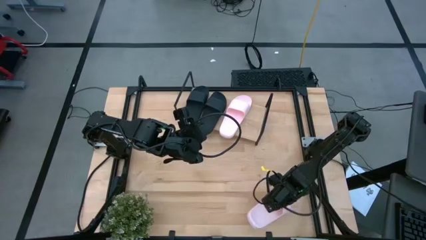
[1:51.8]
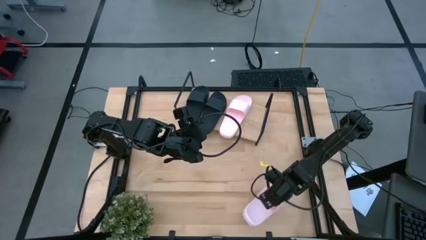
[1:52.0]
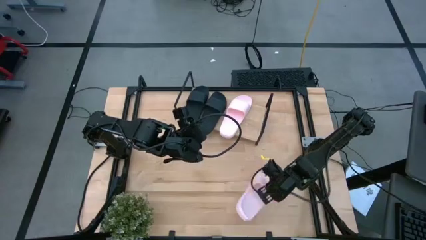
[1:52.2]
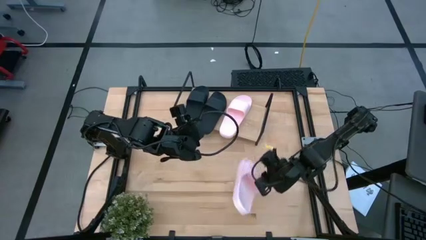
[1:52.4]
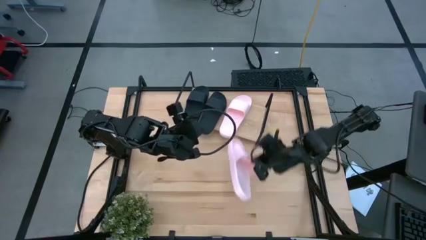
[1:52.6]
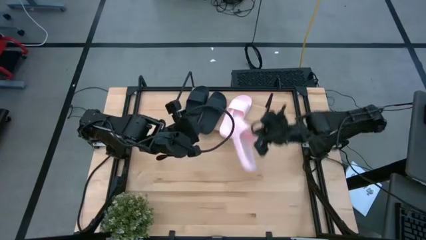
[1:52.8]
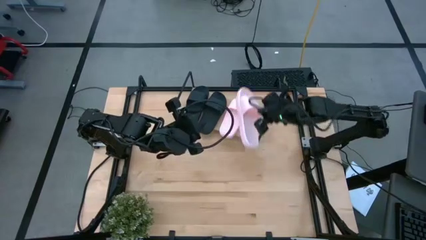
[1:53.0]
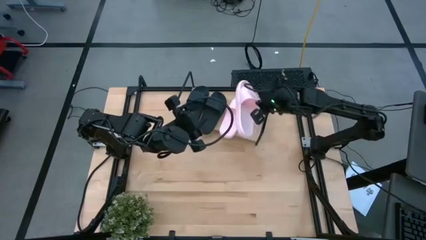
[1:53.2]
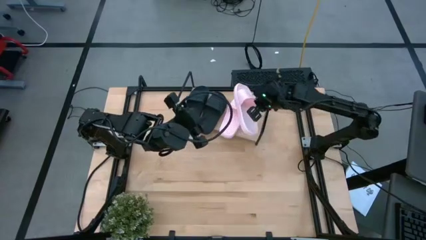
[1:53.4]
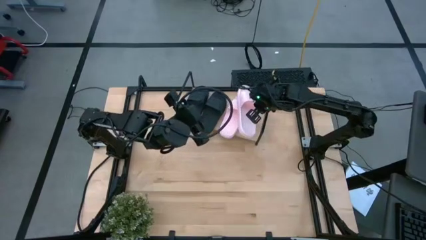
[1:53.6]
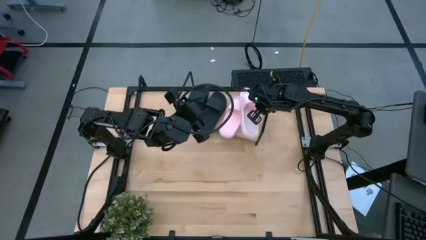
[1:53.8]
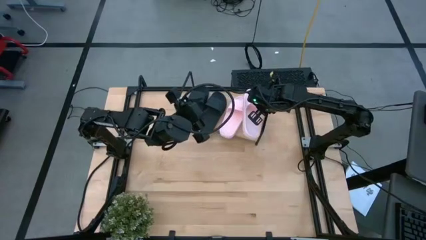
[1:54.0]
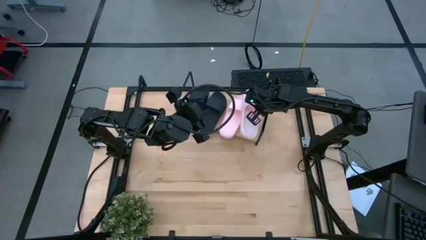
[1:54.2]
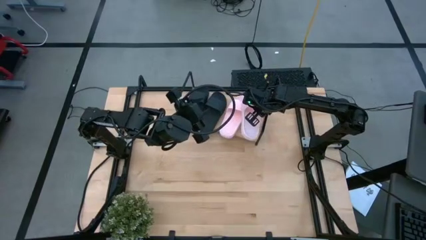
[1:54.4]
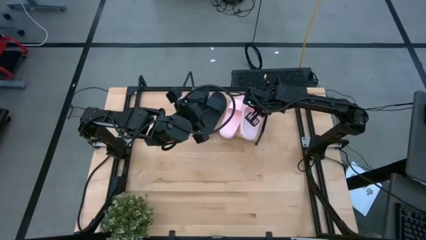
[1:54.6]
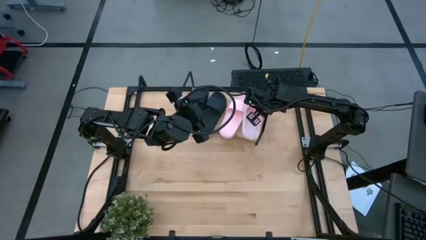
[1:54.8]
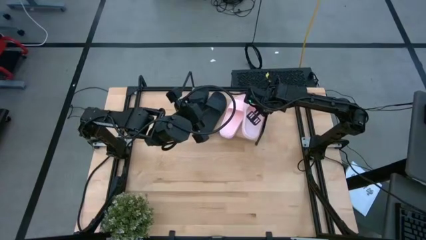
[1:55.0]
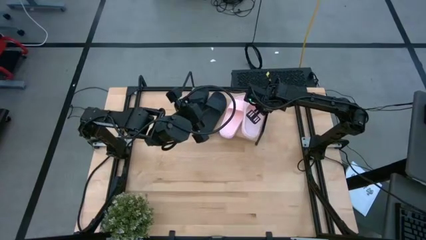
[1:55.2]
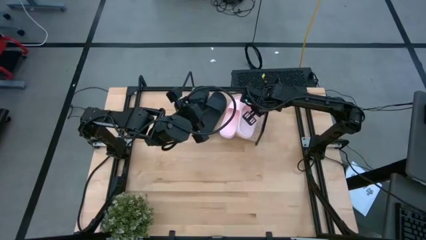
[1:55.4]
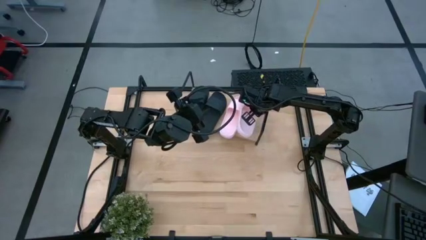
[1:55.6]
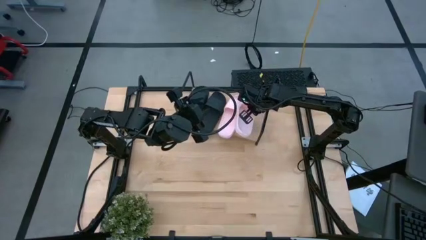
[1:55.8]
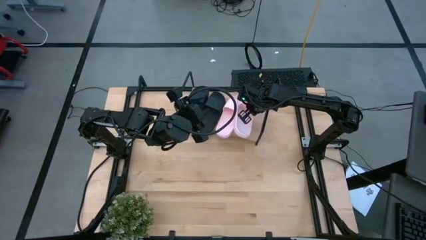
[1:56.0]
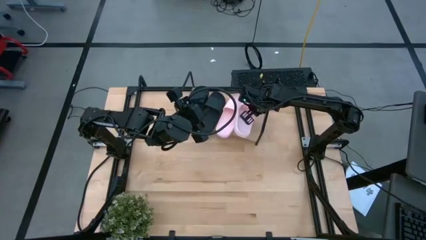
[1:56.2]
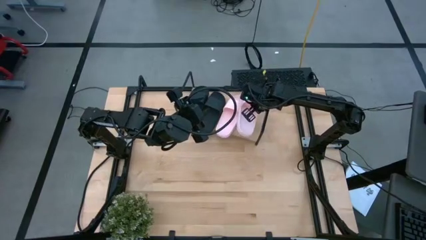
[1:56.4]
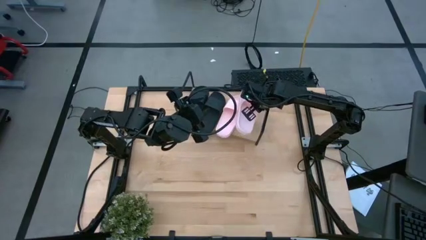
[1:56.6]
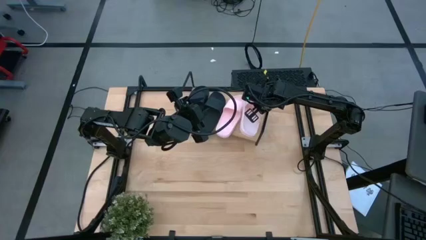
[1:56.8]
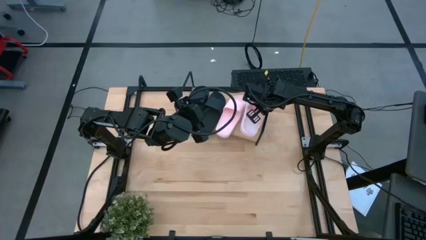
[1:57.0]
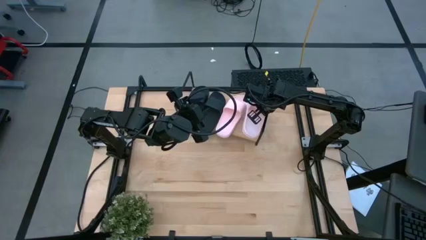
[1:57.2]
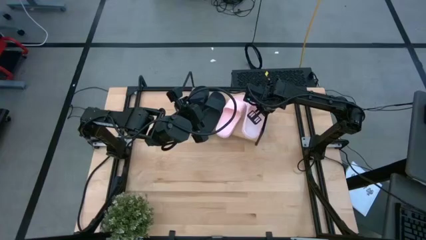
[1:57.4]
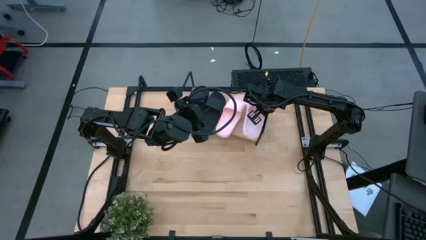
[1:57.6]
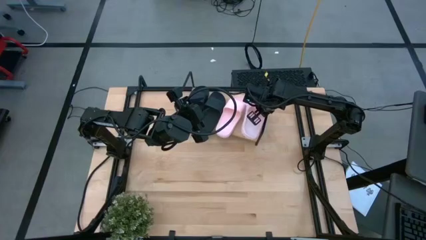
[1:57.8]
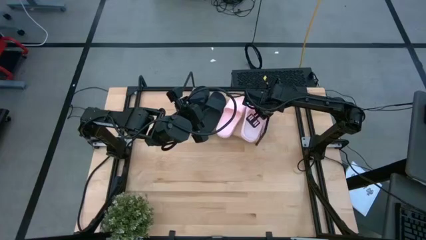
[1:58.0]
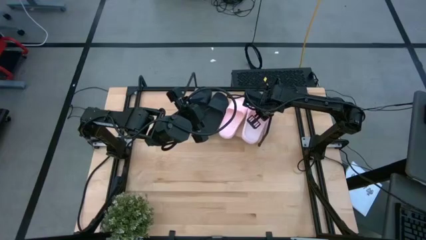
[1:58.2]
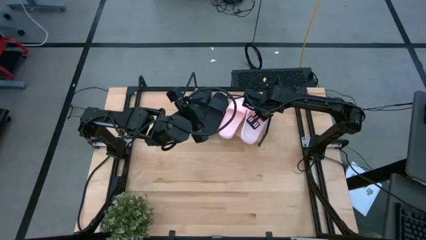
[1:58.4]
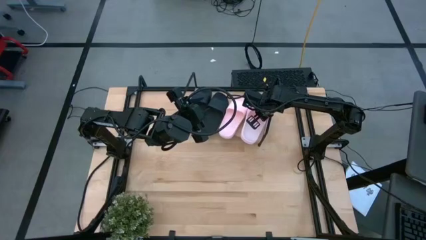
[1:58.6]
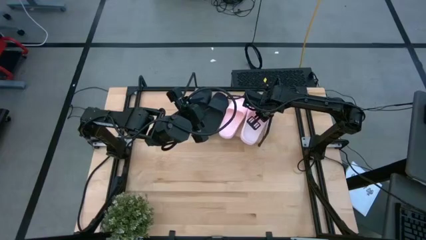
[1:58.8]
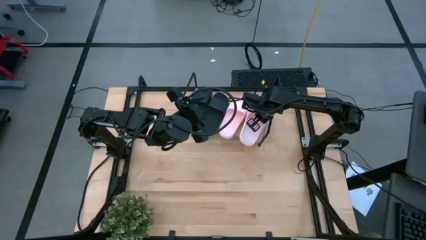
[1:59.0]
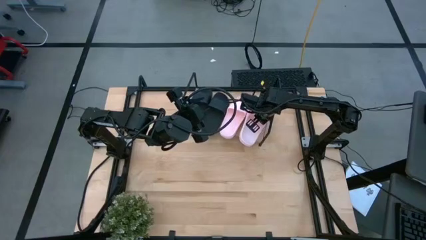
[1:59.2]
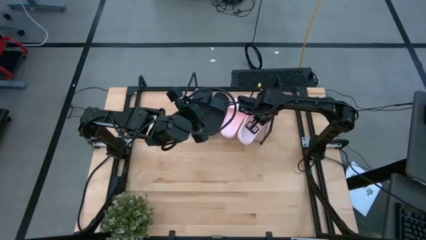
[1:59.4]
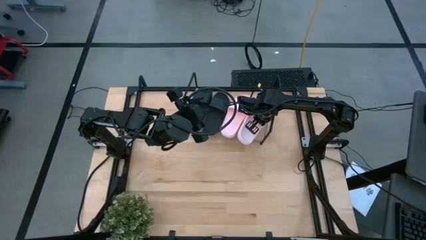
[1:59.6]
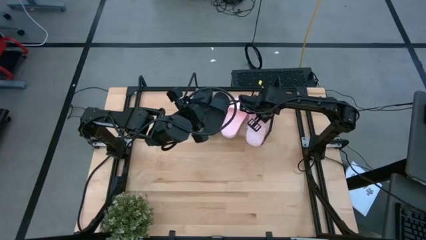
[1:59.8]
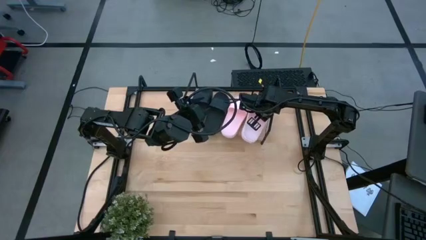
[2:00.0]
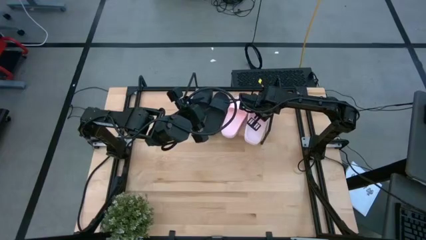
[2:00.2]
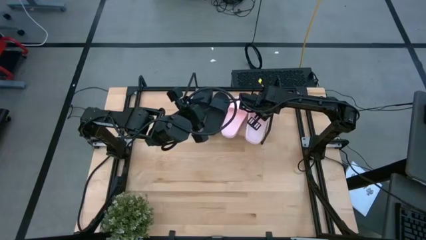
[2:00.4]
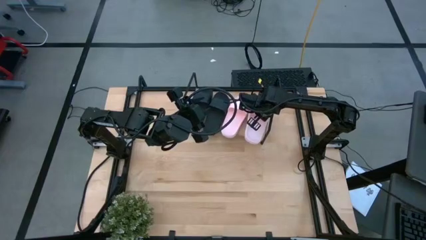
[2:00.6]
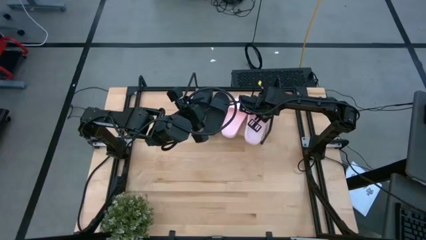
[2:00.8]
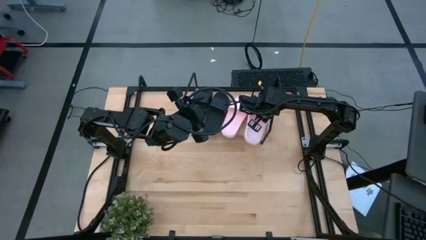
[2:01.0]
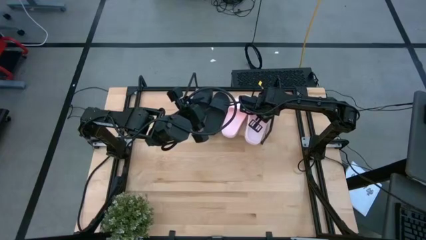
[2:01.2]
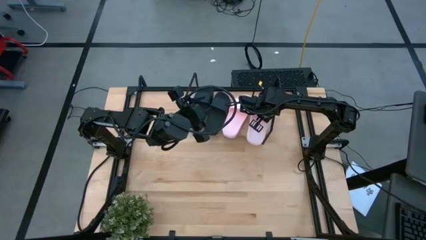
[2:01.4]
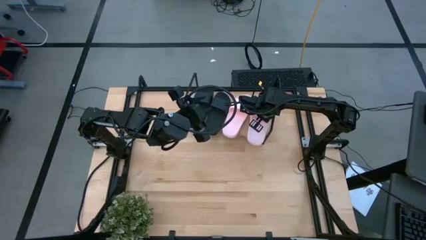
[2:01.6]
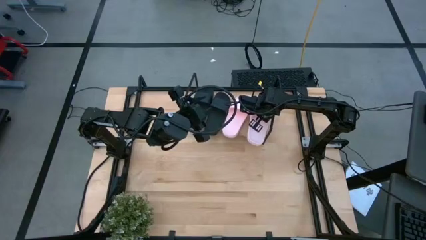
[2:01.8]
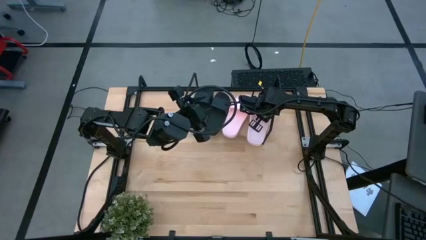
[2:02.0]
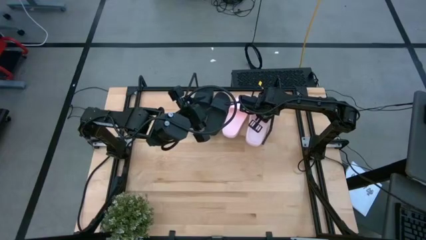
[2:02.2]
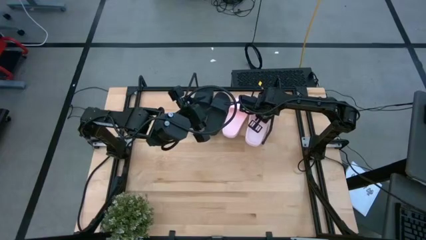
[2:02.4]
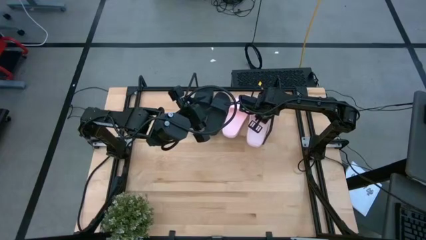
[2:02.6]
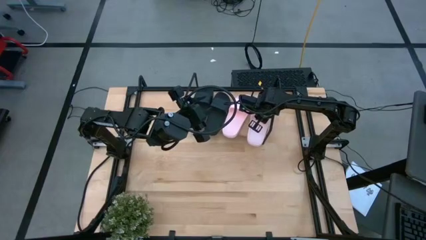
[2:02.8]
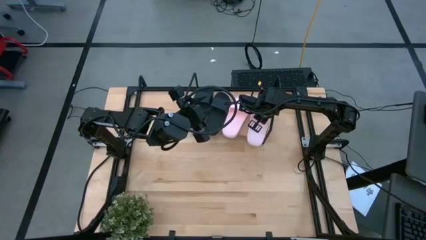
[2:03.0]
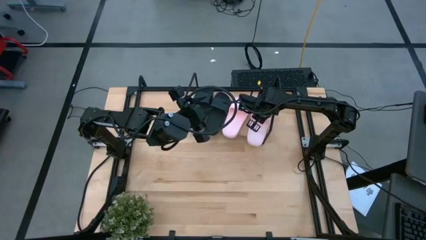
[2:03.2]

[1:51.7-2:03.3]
Task: Pick and place slides into the shelf
Put the pink slipper on the shelf

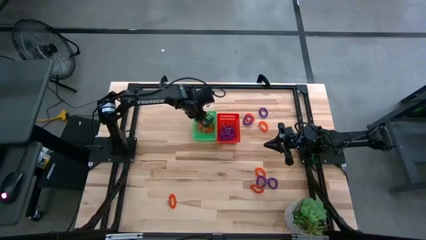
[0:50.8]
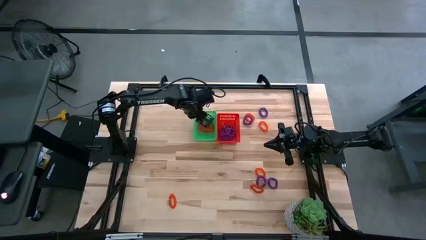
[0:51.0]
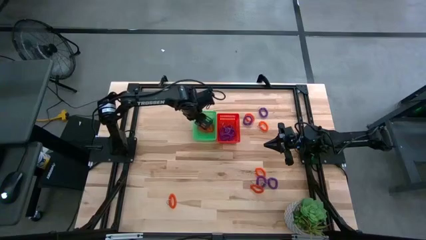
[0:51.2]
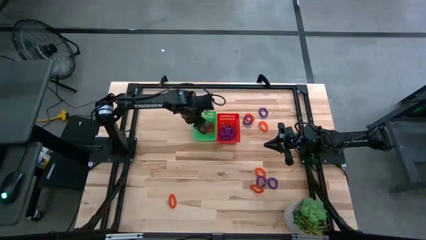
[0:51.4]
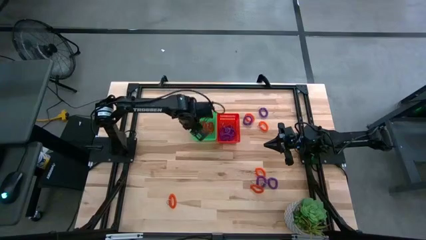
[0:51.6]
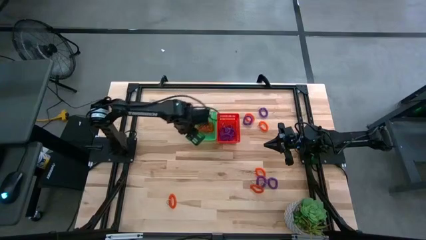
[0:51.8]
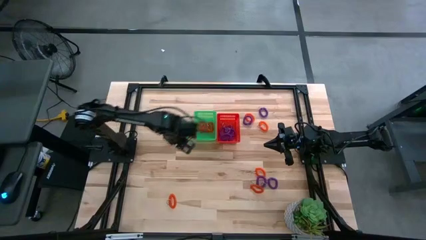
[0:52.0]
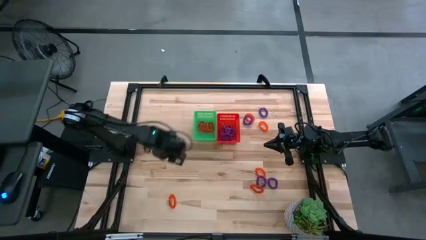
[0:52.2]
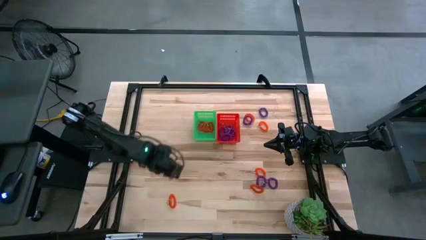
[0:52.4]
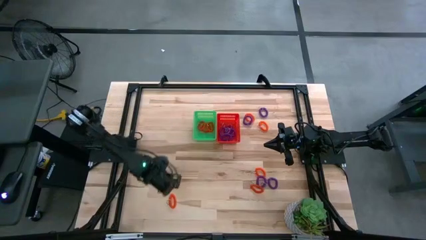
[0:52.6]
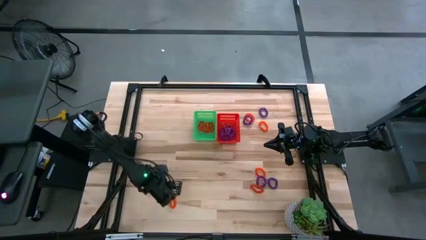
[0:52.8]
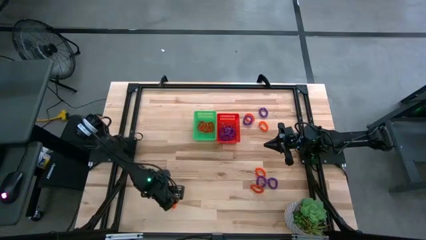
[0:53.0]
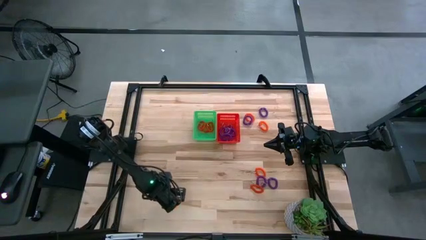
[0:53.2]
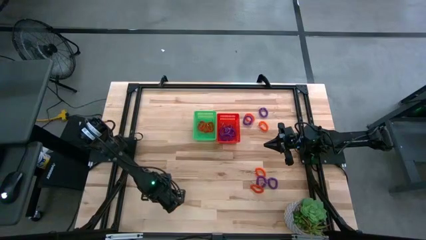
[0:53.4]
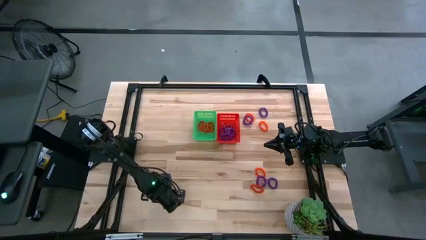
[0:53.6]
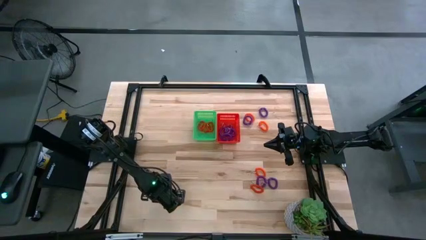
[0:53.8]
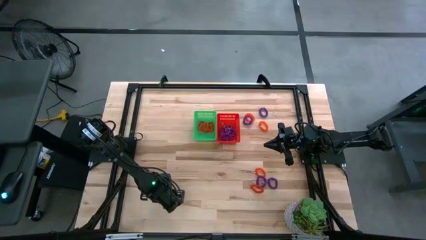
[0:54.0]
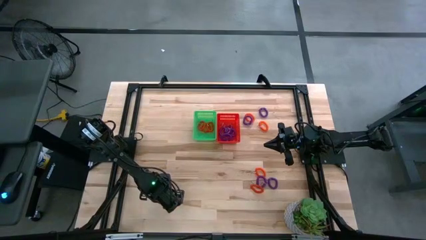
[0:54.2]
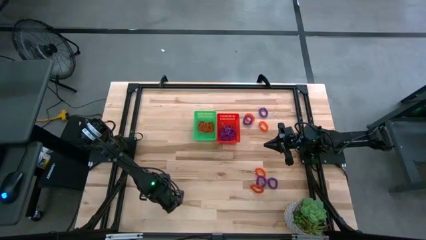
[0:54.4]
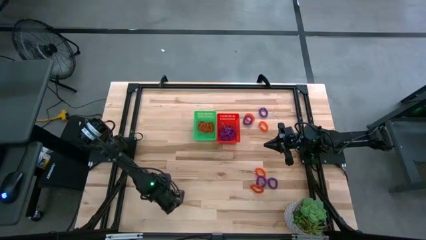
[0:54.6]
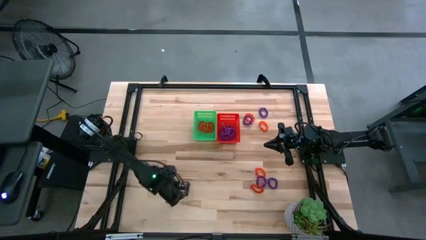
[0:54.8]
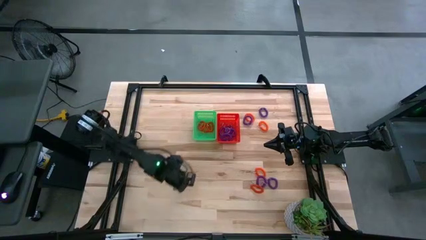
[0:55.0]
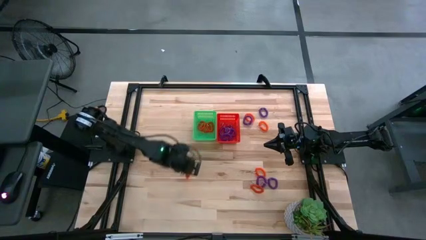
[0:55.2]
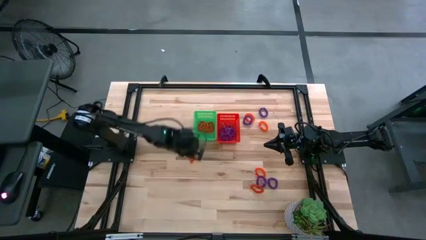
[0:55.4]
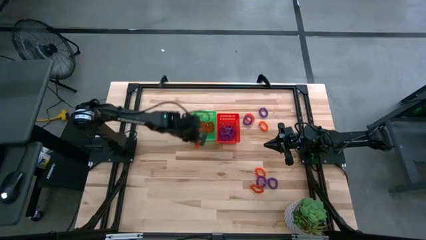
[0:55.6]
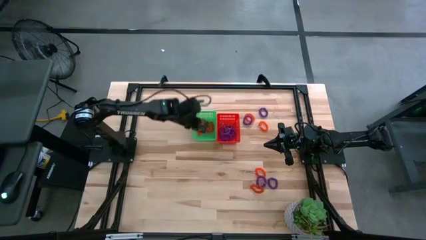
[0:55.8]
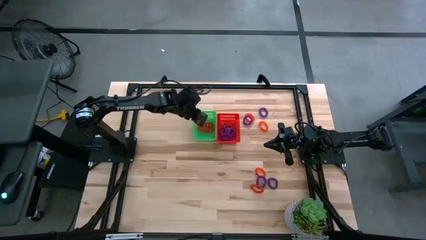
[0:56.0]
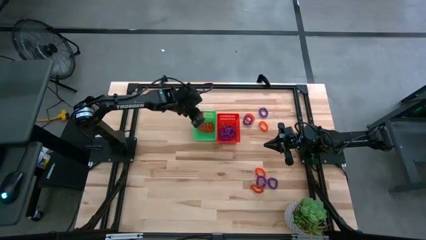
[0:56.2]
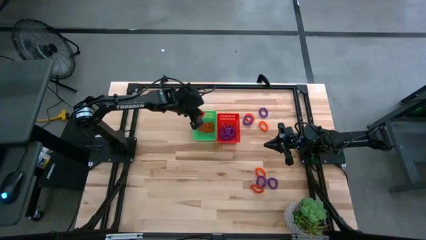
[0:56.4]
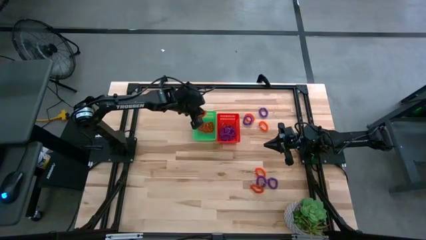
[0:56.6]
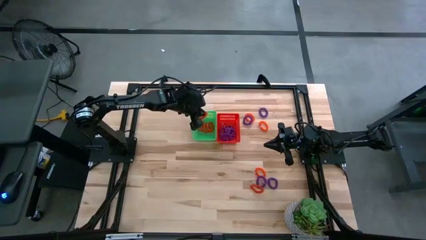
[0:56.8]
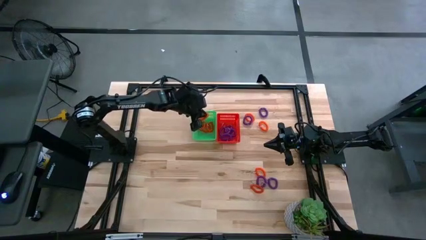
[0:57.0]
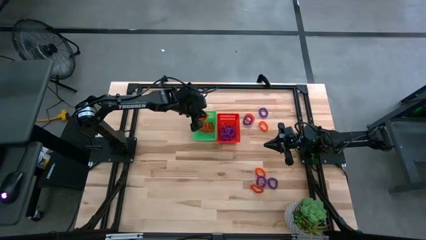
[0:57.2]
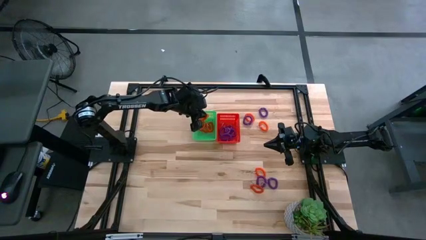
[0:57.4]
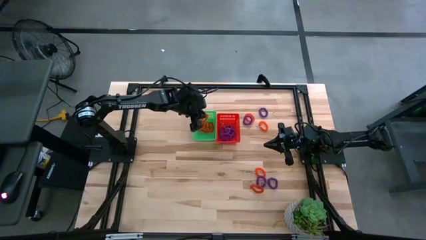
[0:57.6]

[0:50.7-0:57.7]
Task: Sort spring keychains
Put the orange spring keychain into the green bin
